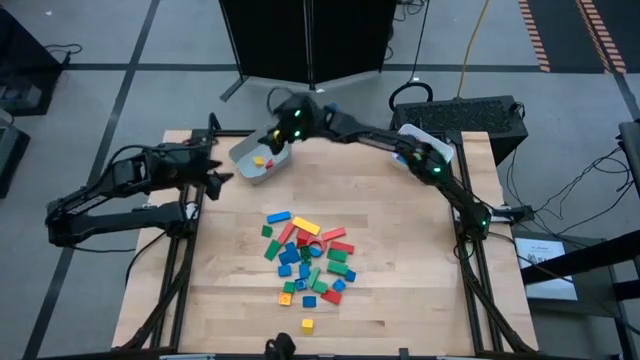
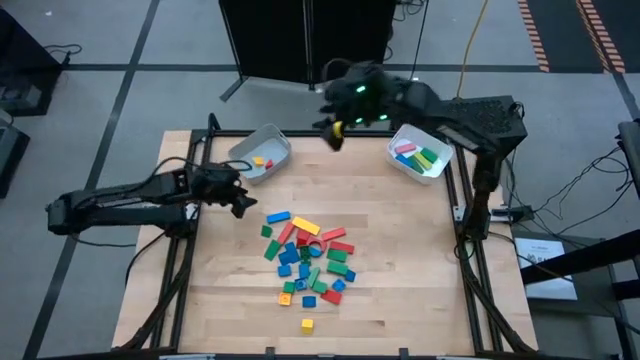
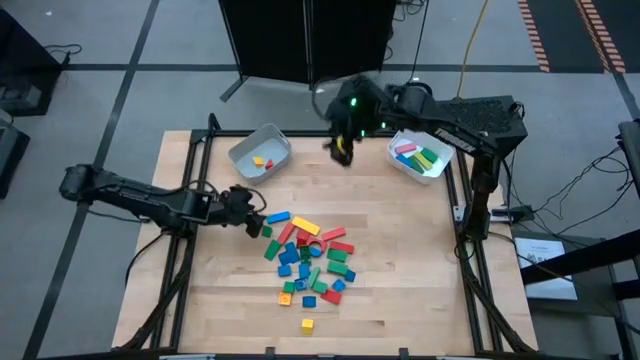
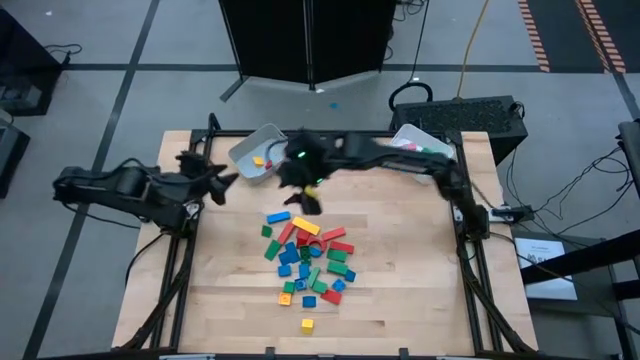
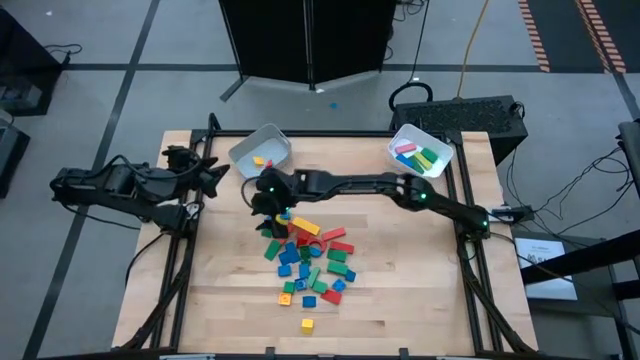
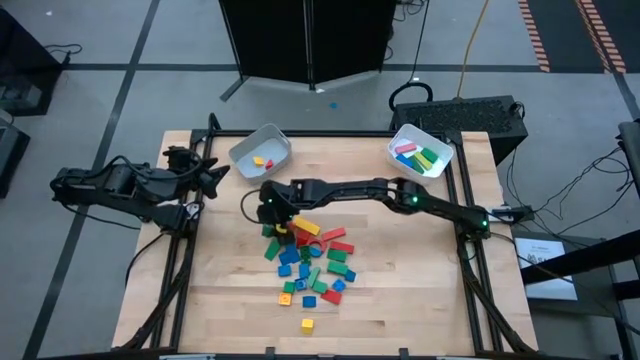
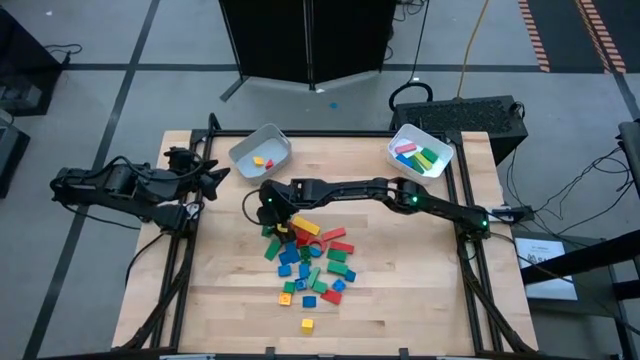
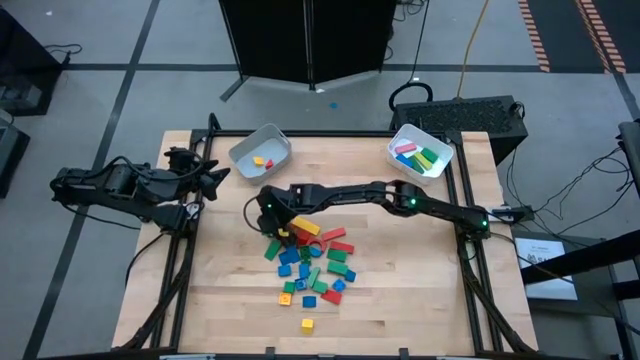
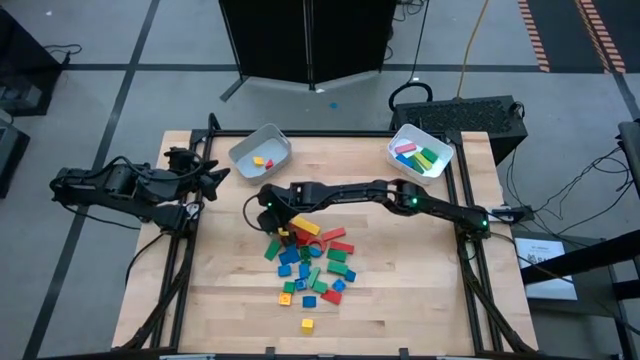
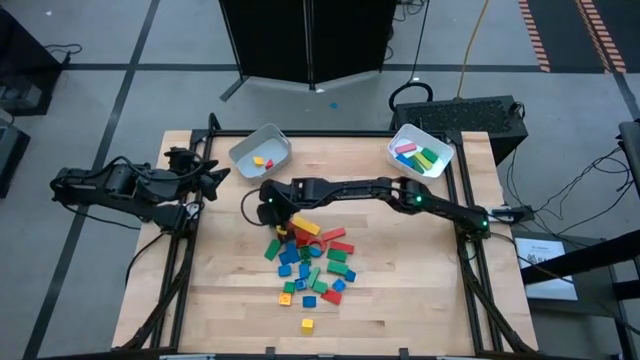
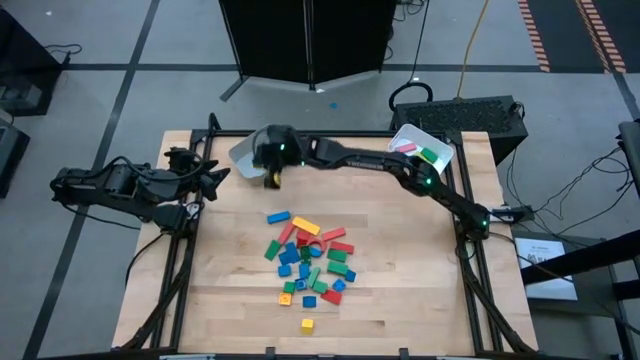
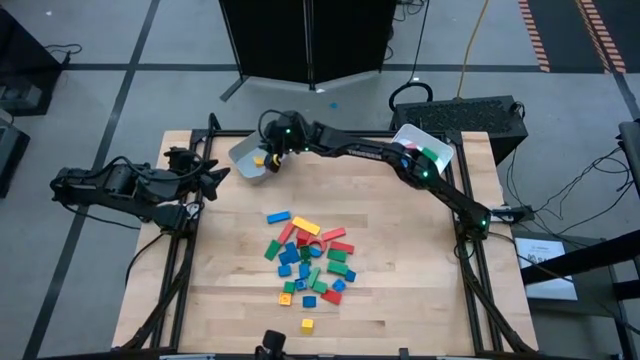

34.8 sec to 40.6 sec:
Task: Sort blocks by size
Put the triangular green block into the gray bin

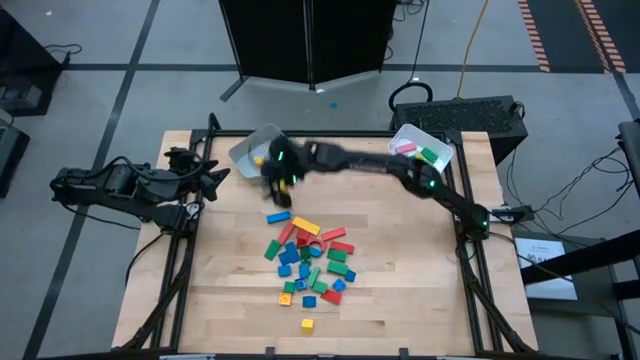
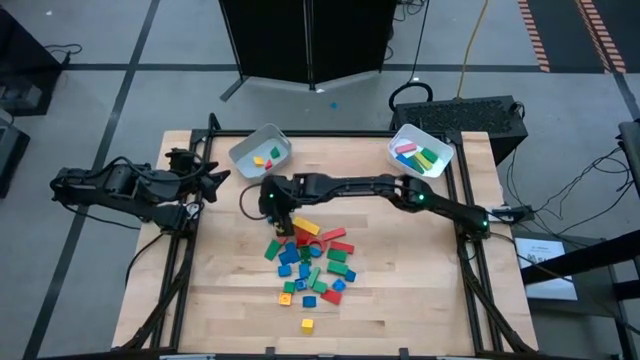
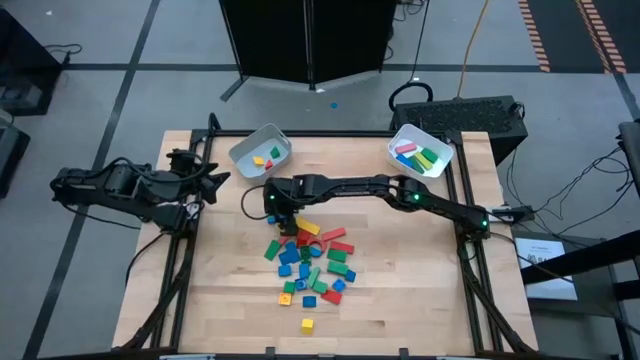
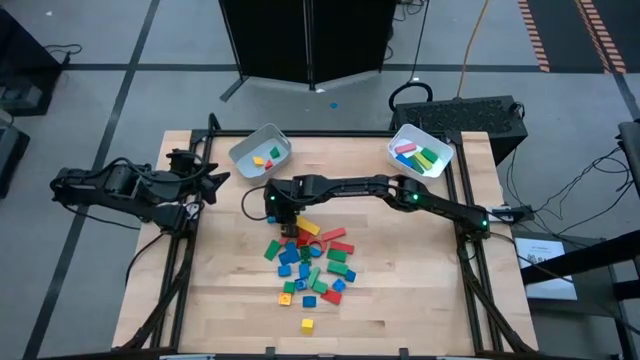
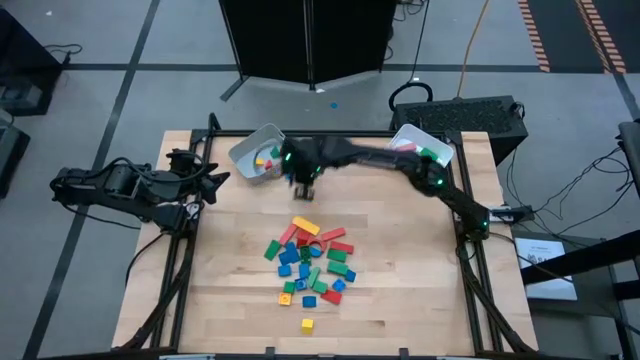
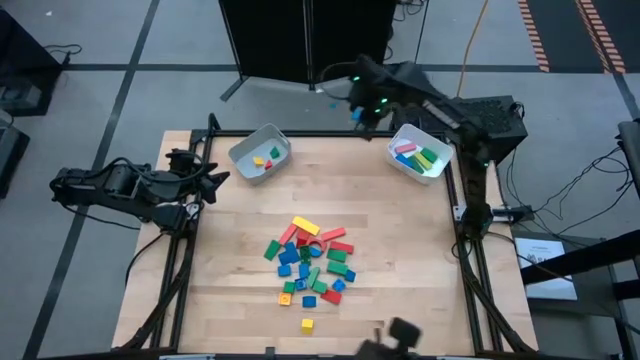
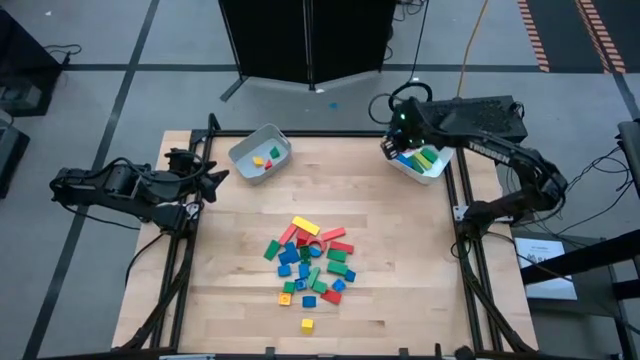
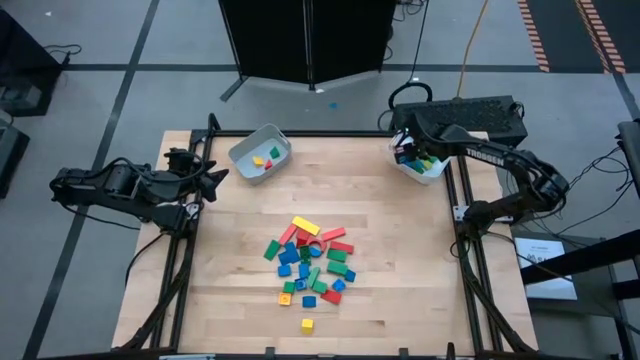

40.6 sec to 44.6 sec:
Put the rectangular blue block into the white bin

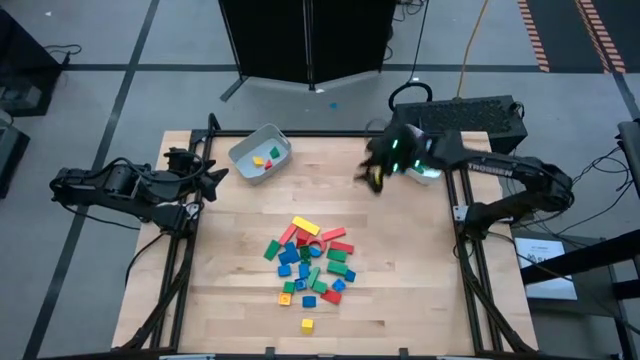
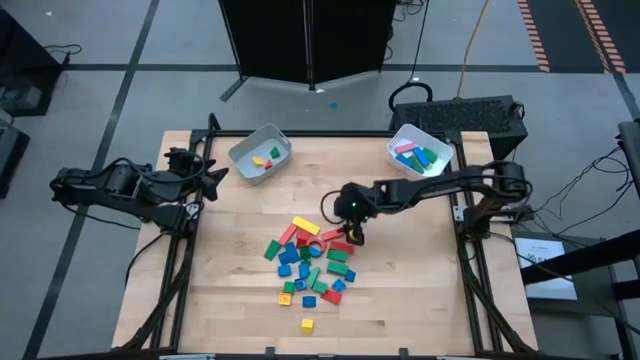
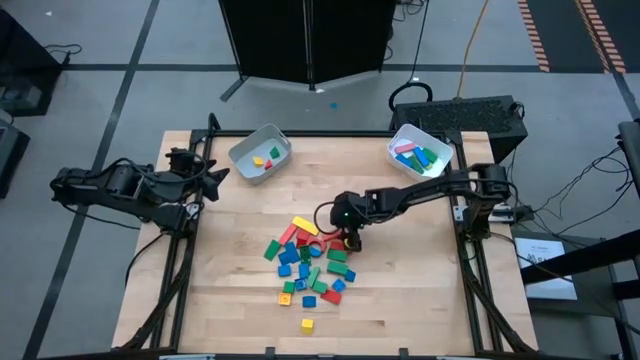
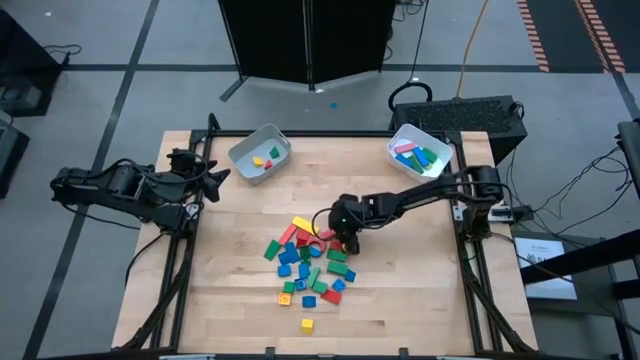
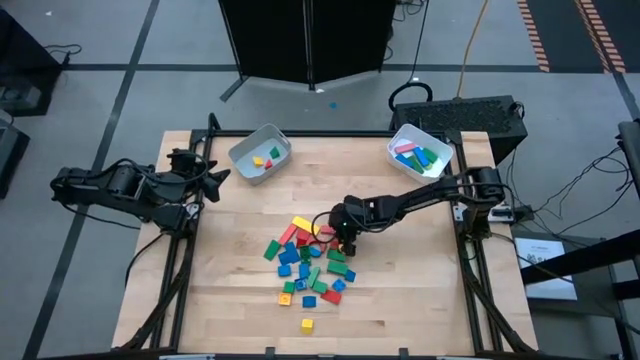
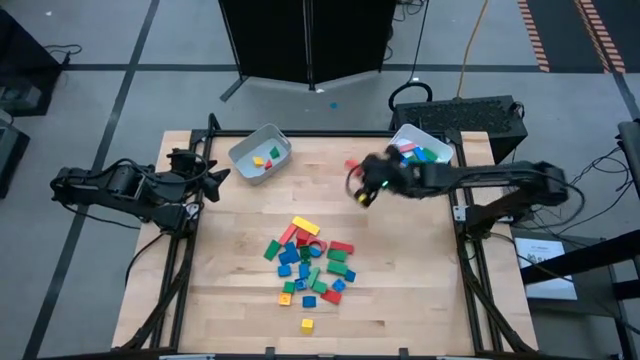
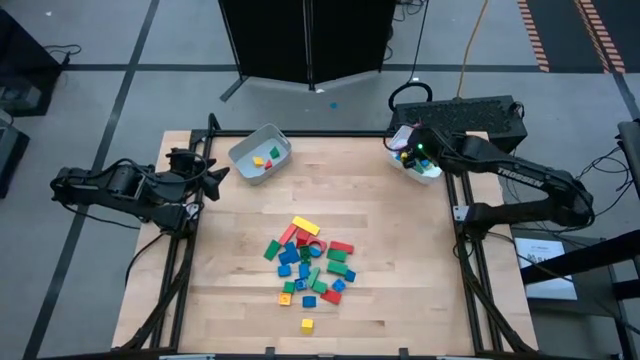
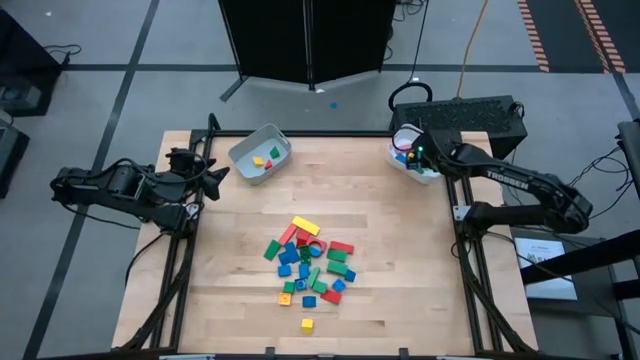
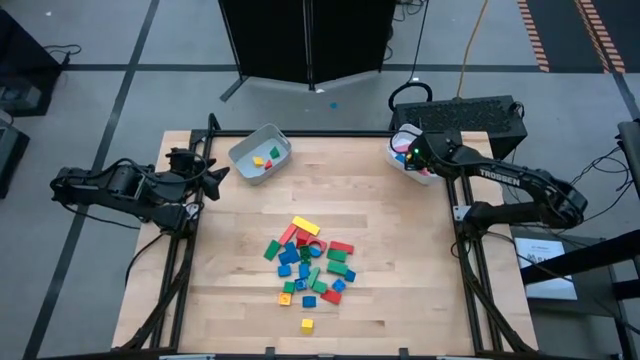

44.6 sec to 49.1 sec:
Put the rectangular red block into the white bin

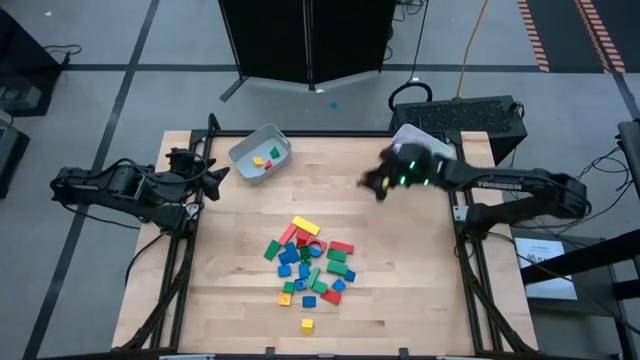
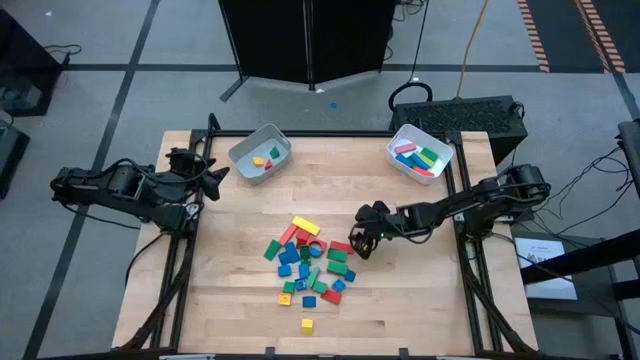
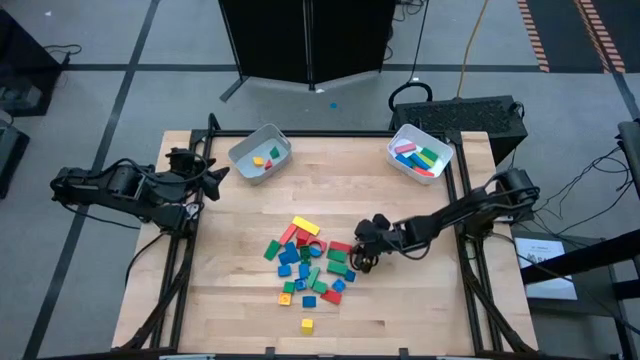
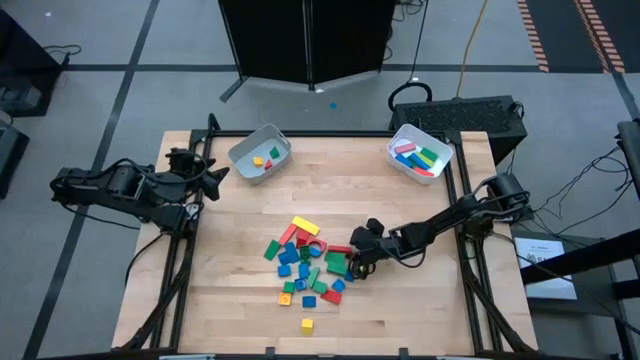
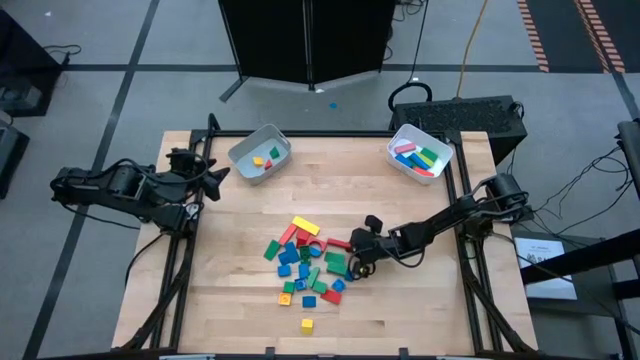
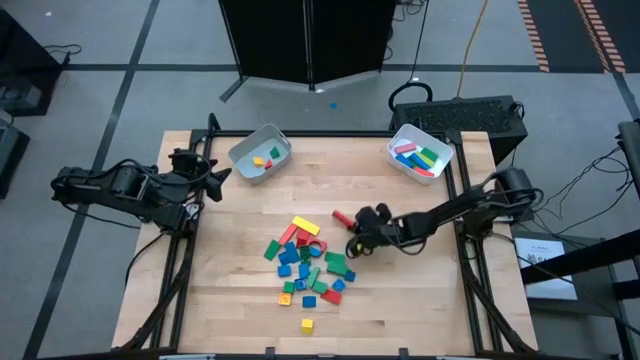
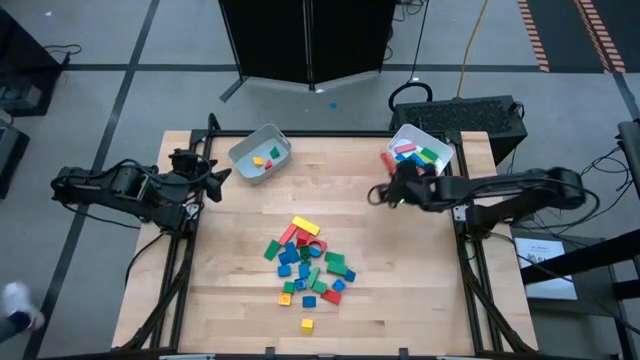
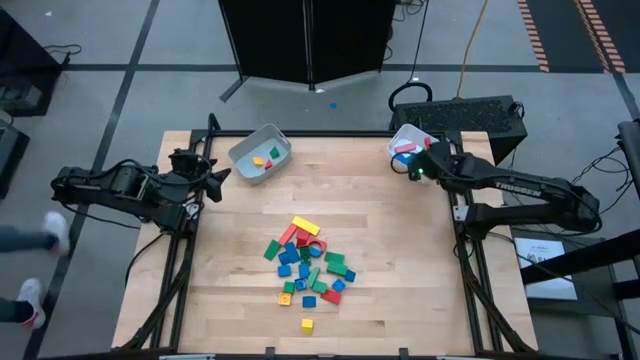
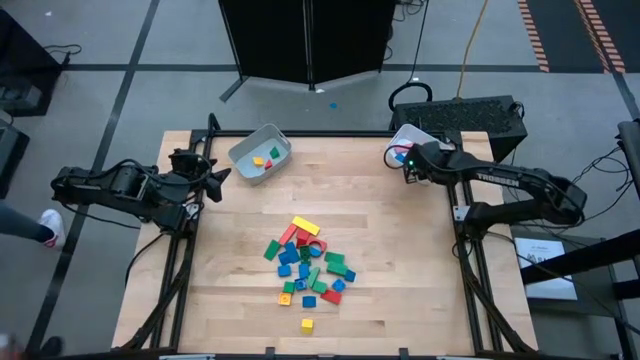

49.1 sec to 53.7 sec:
Put the rectangular red block into the white bin

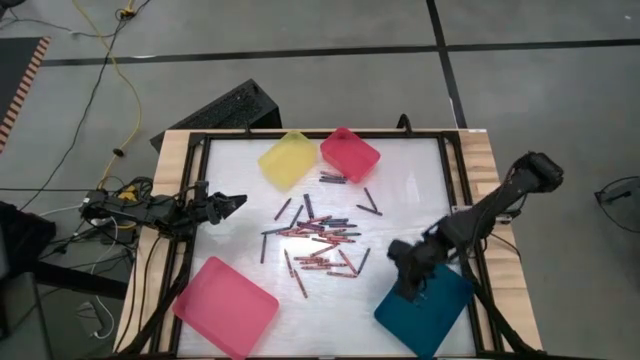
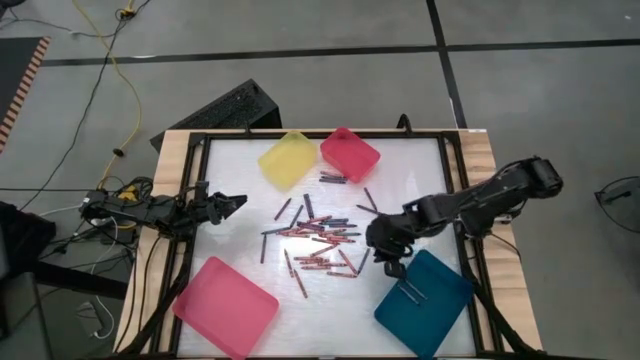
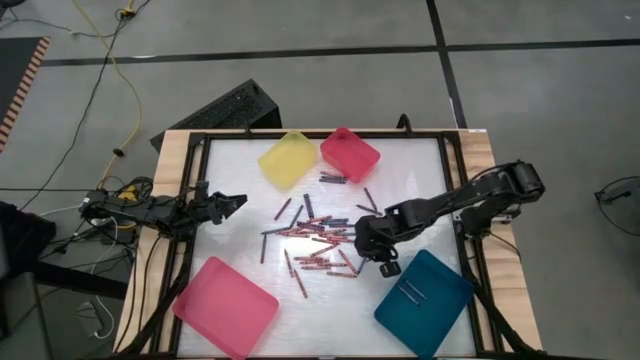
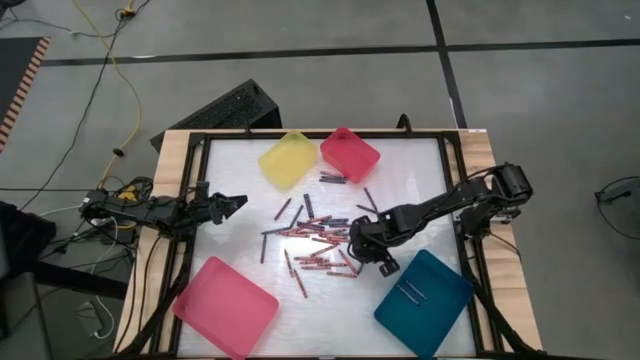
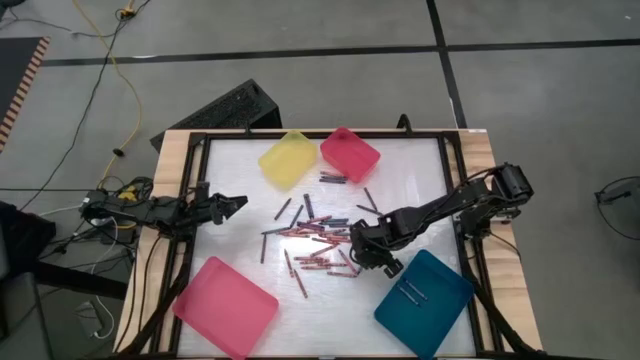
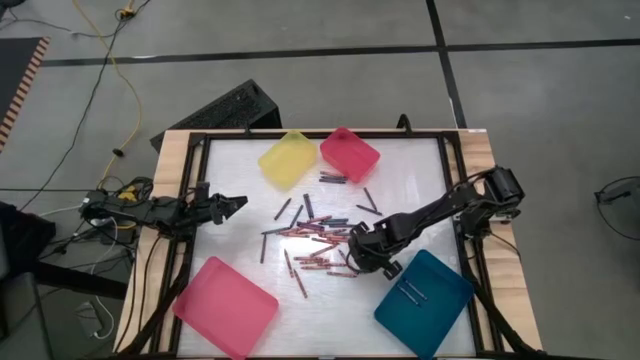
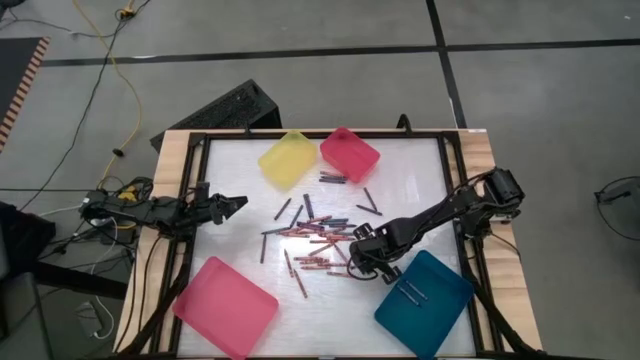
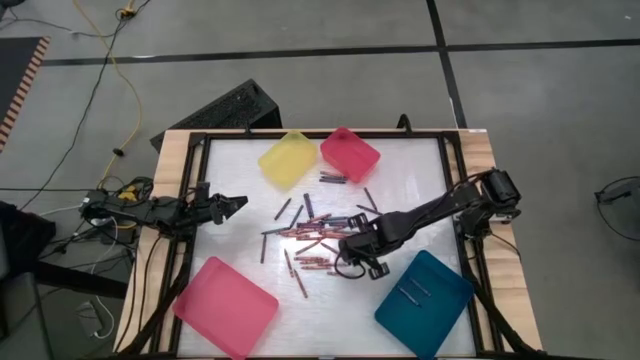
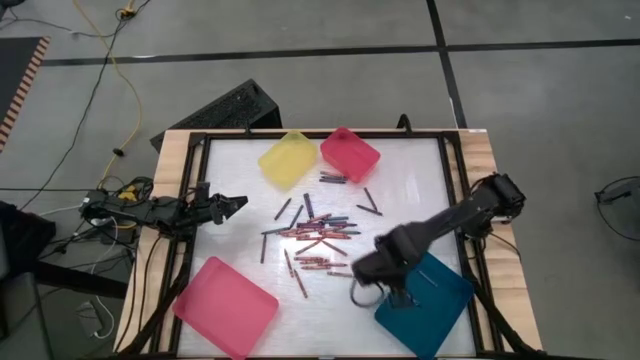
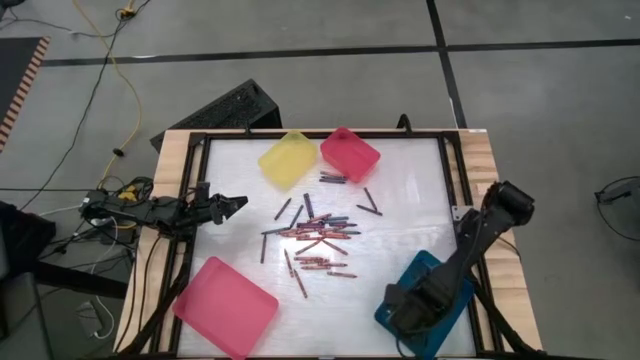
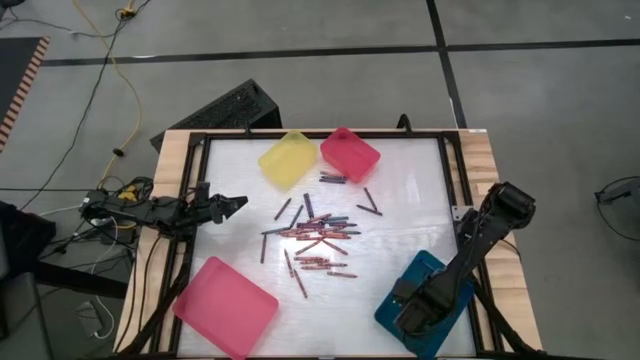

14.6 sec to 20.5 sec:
Task: Sort crayons
Put the blue crayon into the blue bin
